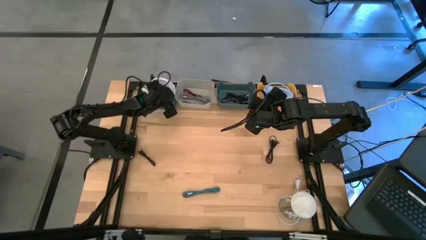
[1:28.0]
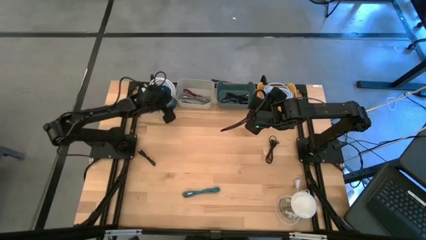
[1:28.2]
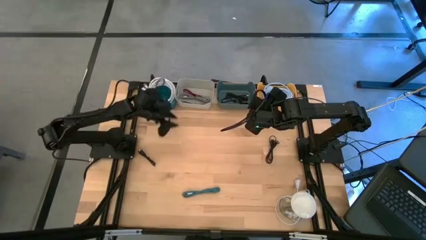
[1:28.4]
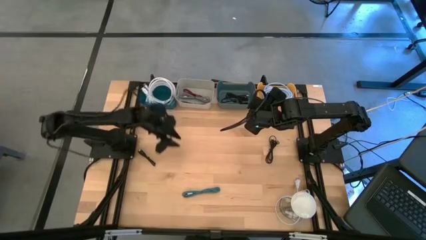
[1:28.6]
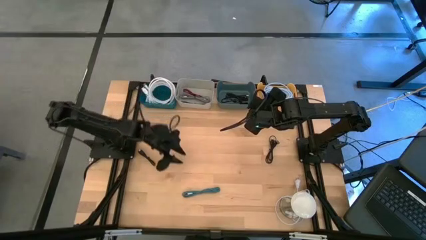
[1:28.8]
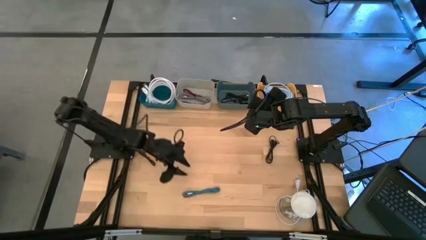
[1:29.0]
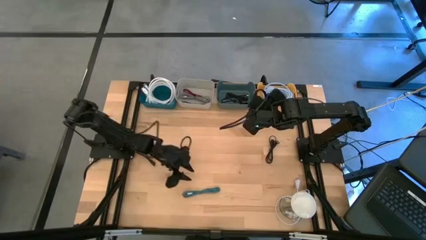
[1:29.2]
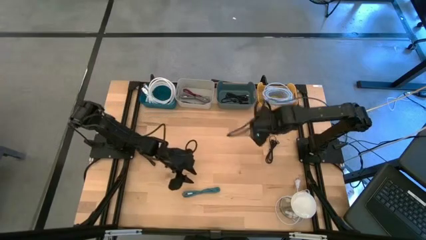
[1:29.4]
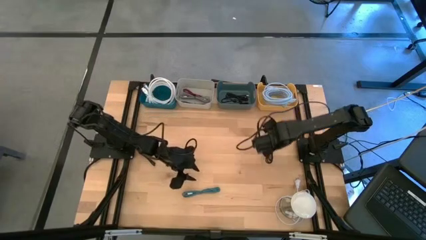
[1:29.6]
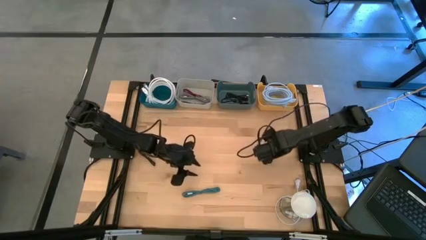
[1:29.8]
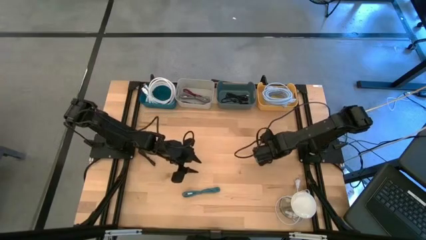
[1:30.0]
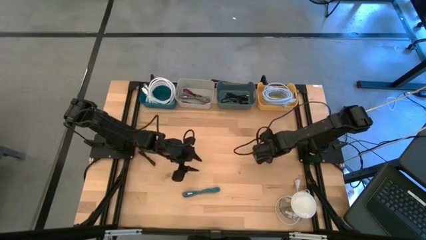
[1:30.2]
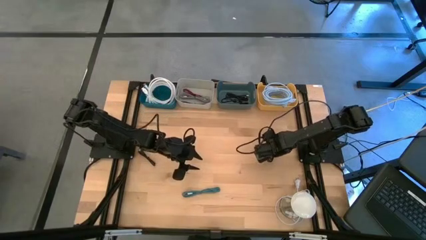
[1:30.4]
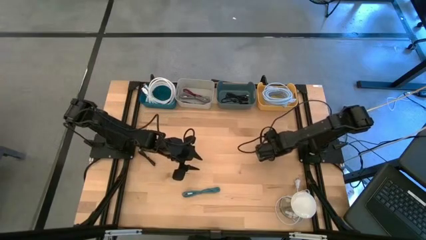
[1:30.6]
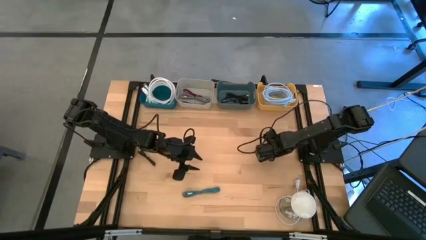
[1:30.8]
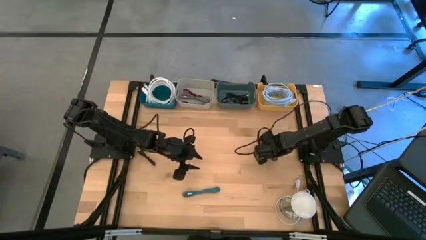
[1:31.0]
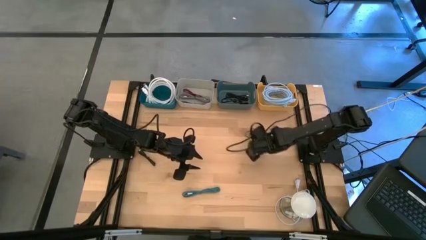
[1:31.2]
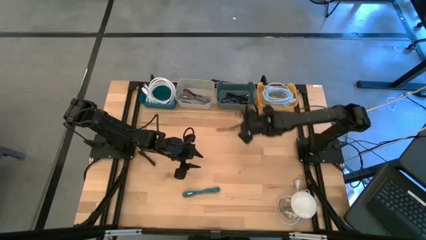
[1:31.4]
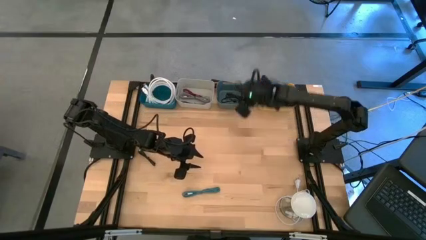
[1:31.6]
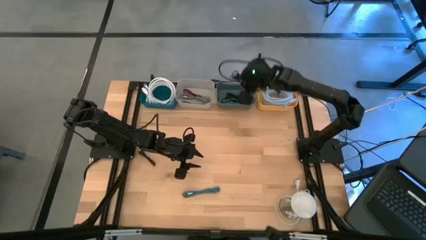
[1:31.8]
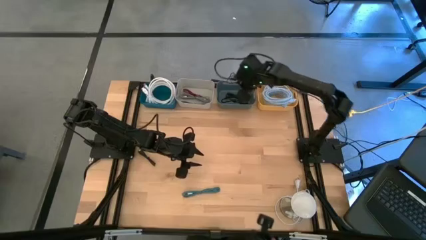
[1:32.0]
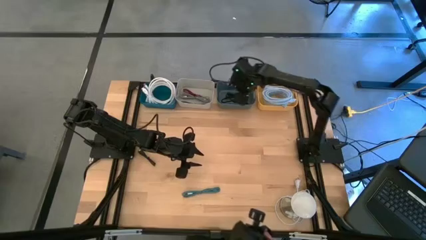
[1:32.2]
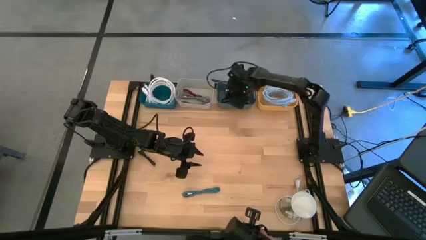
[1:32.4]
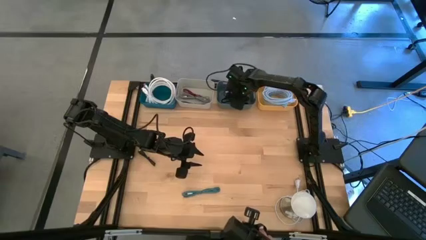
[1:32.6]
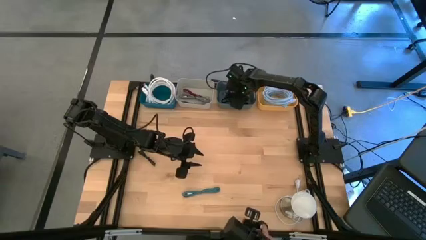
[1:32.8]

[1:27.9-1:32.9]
Task: Pick & Place USB Port
Put the black USB cable into the dark blue bin

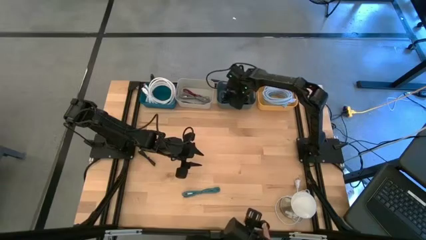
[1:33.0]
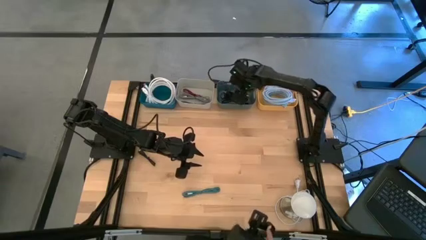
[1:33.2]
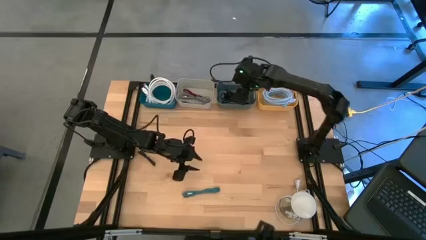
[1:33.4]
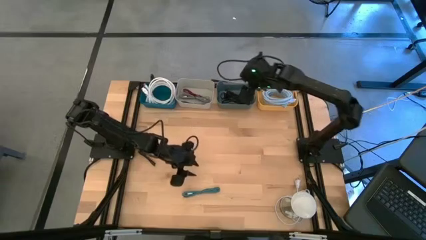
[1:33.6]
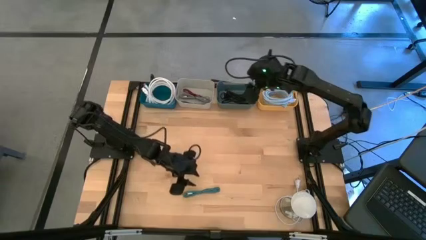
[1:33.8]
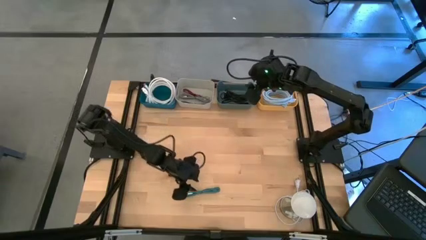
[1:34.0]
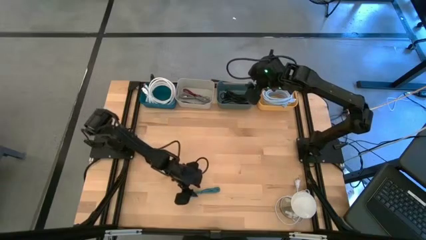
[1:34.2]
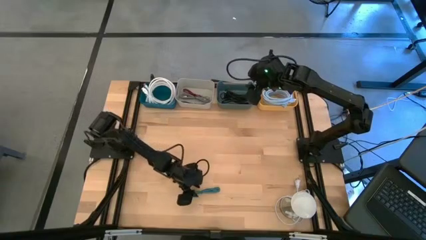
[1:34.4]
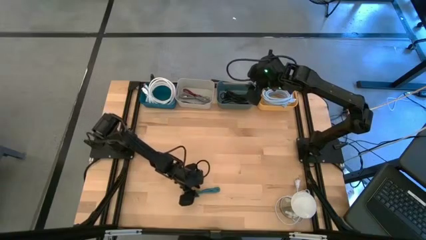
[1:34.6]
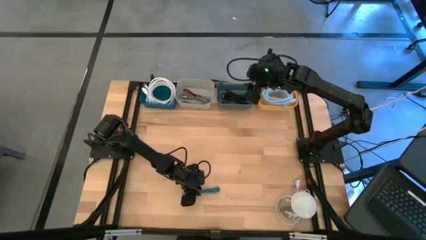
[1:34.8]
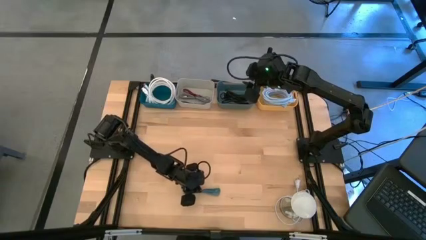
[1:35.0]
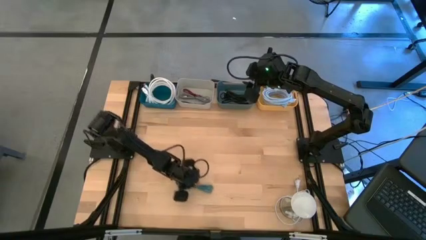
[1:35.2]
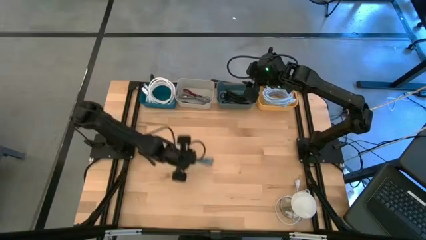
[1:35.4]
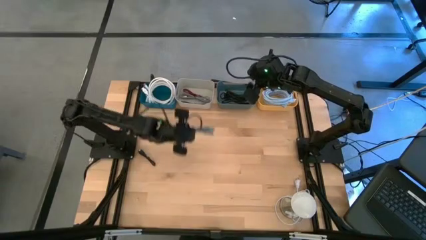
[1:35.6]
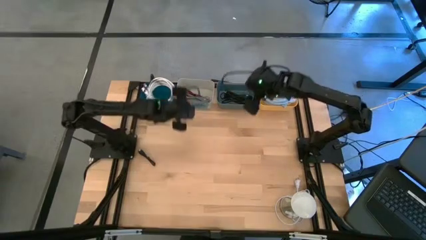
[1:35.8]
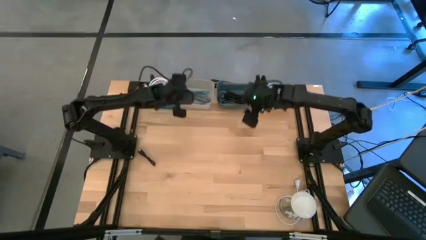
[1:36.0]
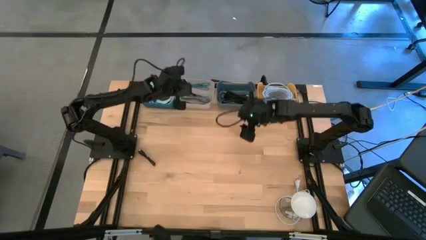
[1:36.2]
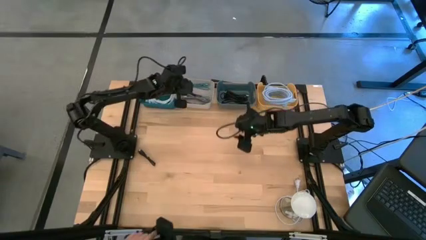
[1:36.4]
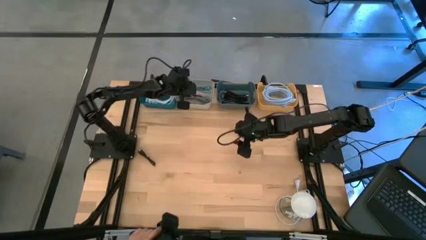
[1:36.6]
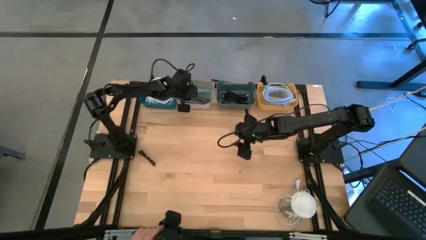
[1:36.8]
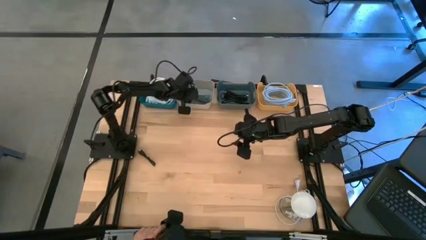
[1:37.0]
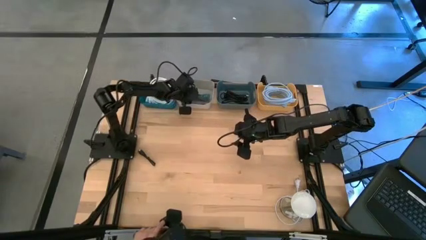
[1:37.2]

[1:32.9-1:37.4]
Put the black and blue USB cable into the gray bin

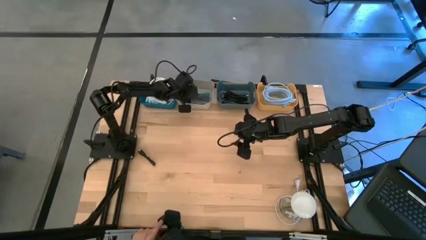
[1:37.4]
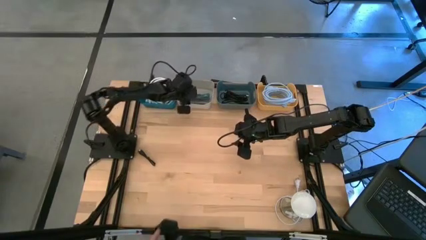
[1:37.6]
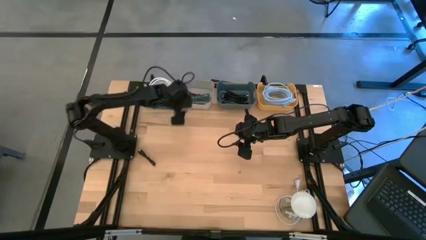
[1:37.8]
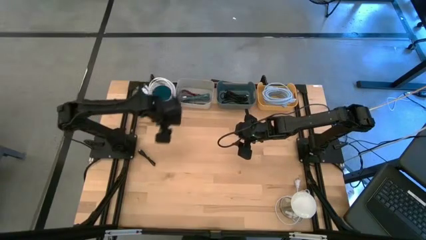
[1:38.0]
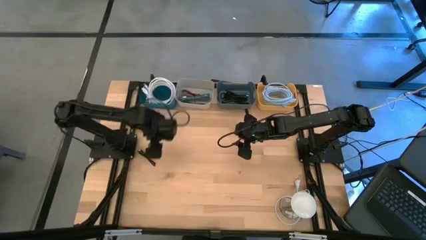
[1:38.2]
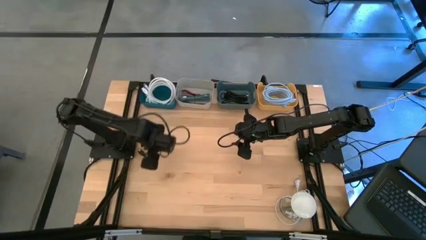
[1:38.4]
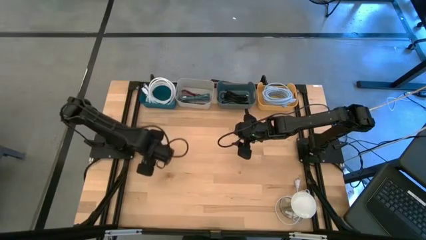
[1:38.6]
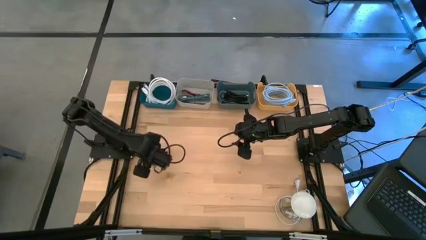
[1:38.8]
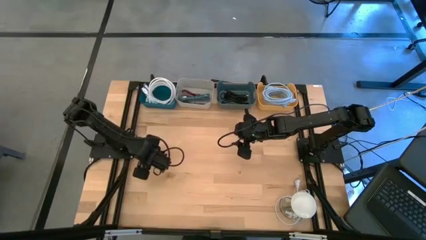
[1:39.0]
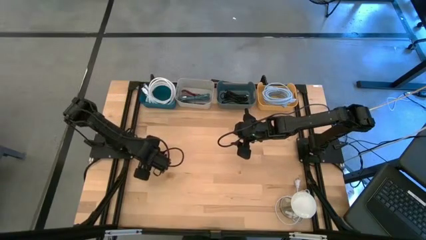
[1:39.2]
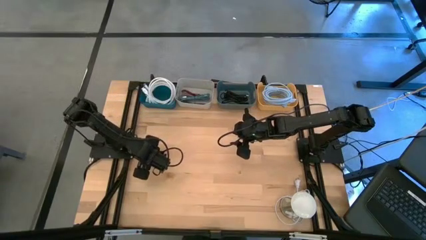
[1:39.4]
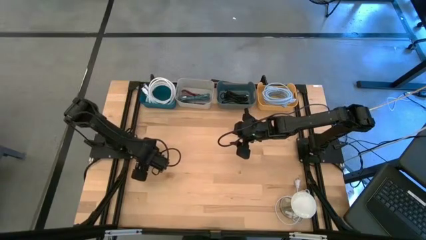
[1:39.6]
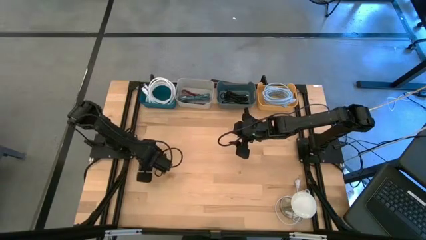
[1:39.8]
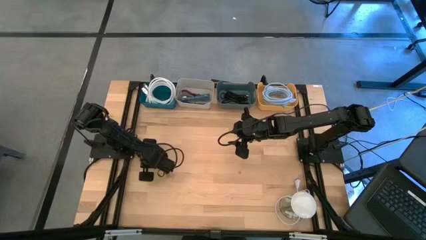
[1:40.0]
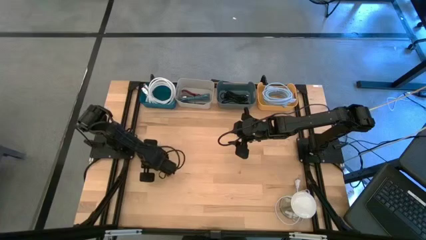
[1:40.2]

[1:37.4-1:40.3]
Put the black USB cable into the dark blue bin

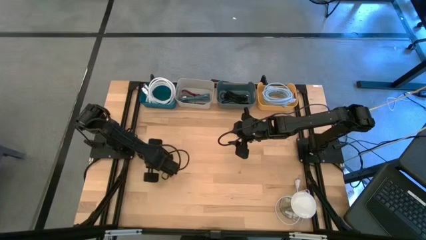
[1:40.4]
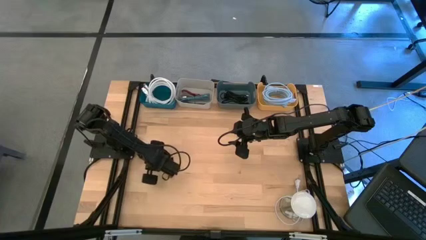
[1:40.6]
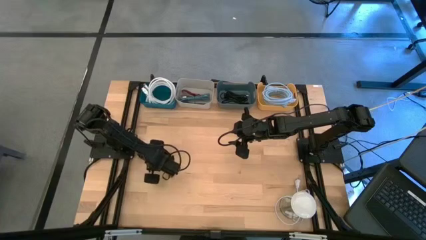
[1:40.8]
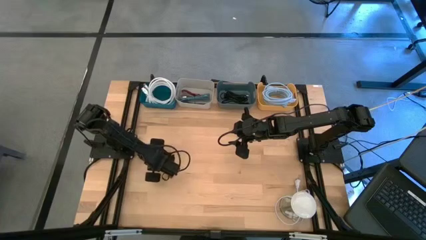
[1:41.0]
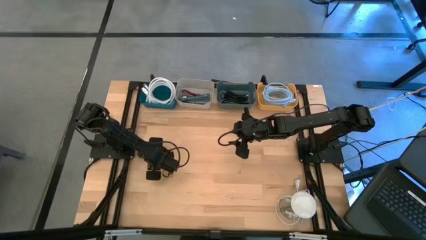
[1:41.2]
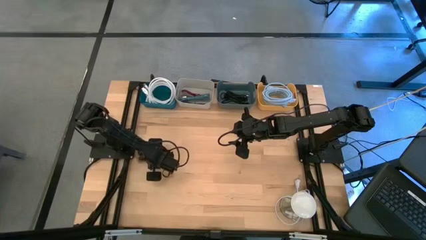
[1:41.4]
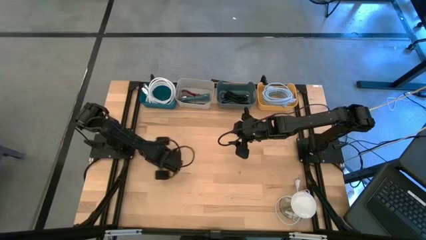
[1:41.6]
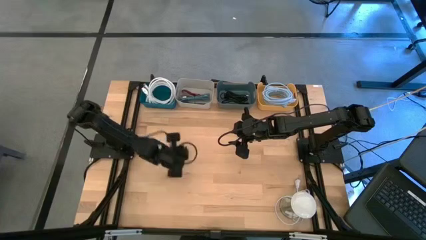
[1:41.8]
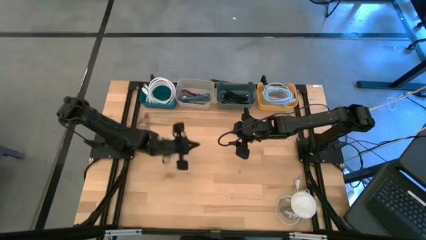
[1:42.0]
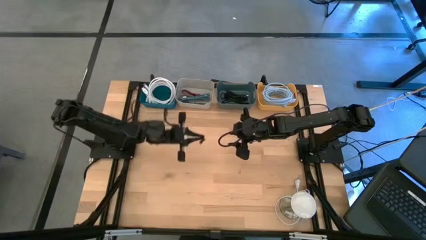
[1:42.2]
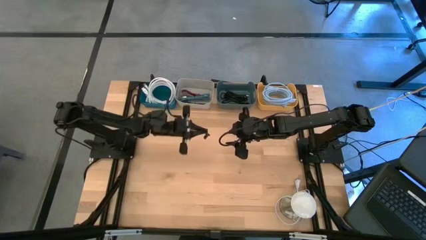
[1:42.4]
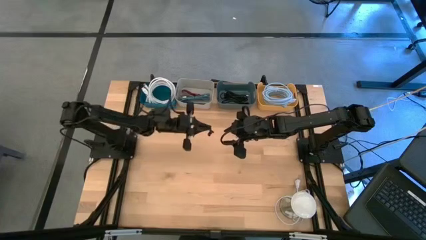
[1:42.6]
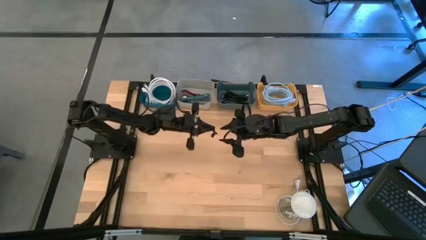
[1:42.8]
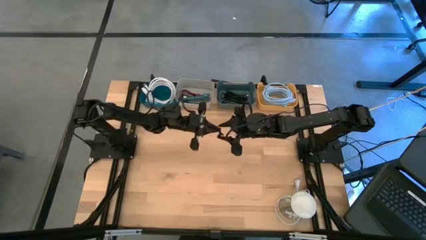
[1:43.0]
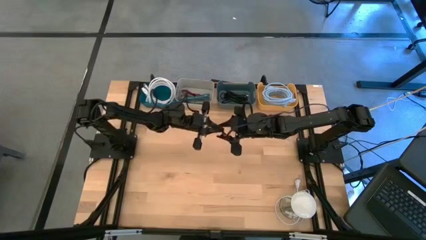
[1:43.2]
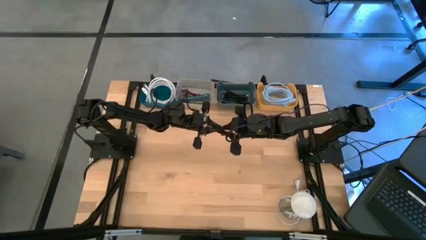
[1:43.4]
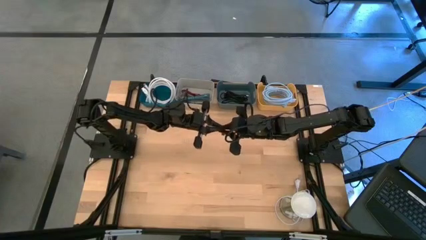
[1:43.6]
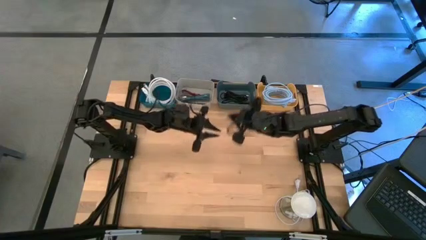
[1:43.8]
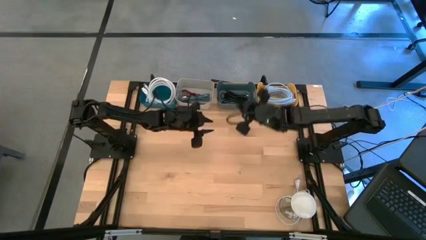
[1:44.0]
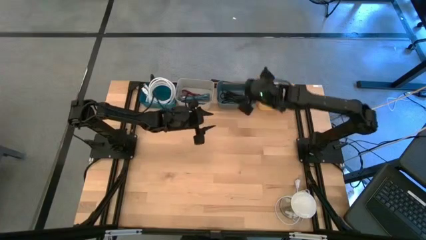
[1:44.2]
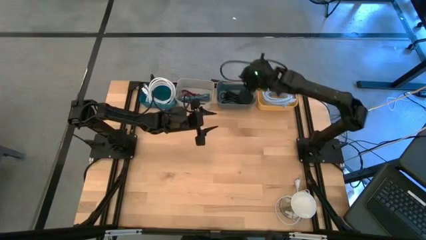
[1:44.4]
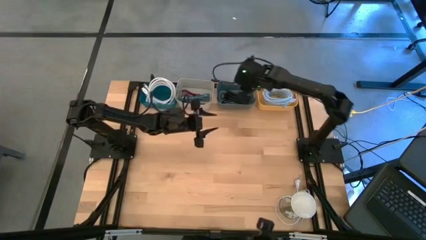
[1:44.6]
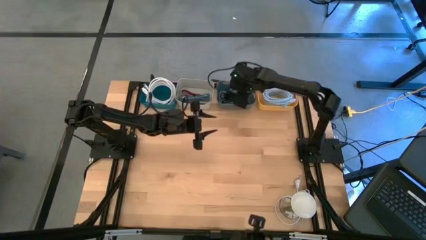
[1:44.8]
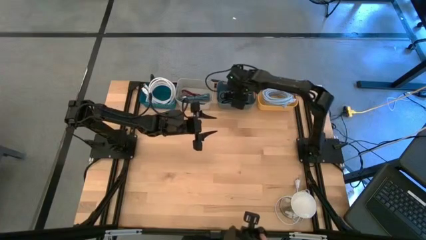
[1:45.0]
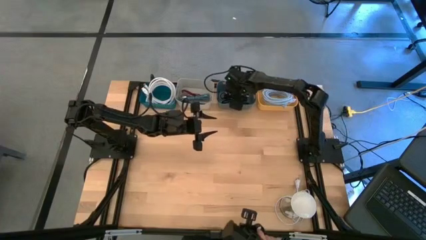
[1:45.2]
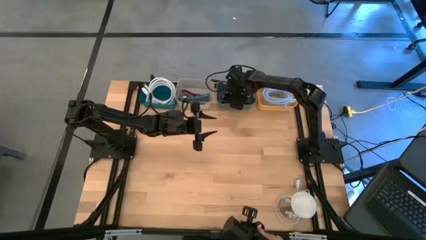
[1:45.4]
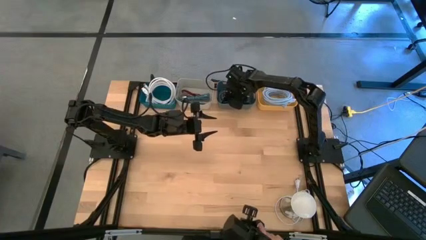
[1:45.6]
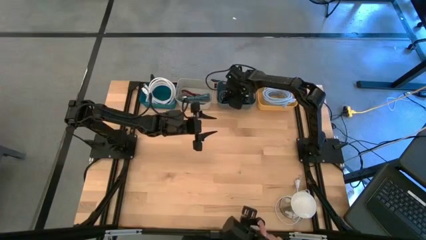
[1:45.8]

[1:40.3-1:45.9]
Put the black USB cable into the dark blue bin
